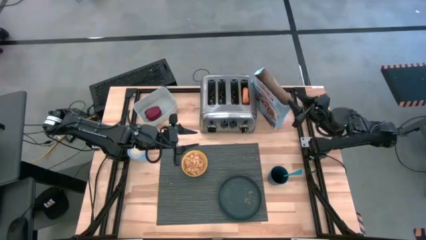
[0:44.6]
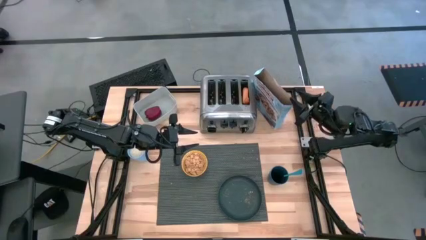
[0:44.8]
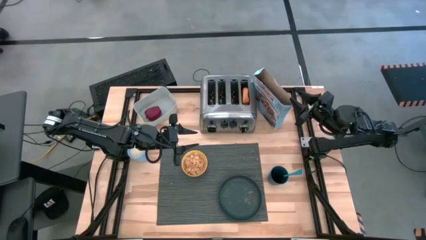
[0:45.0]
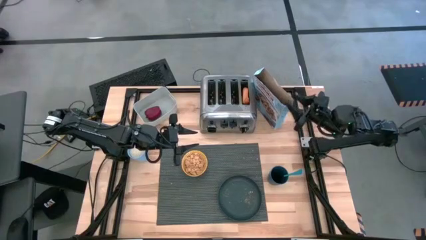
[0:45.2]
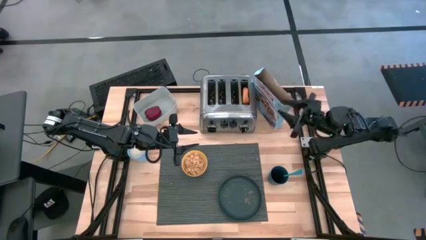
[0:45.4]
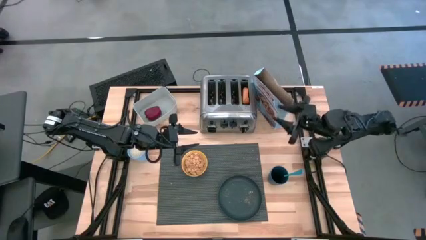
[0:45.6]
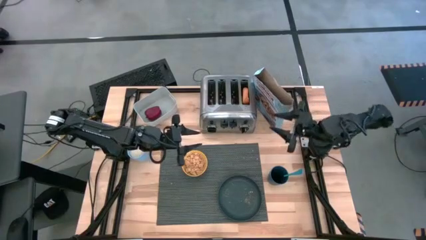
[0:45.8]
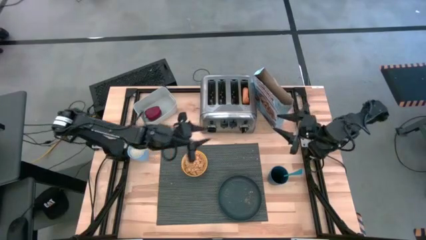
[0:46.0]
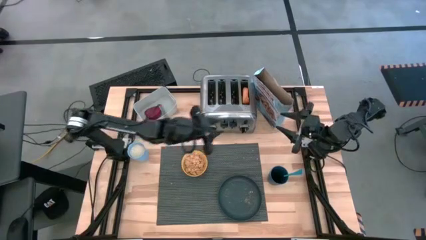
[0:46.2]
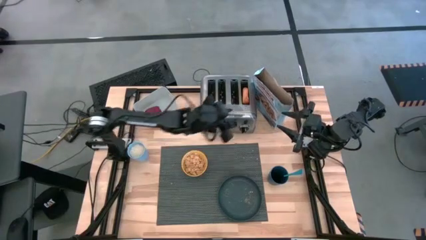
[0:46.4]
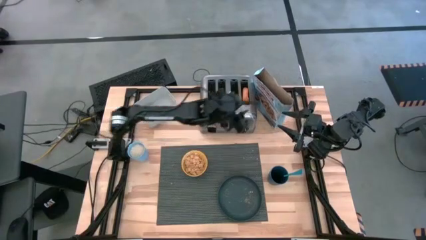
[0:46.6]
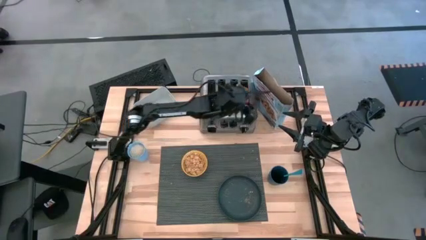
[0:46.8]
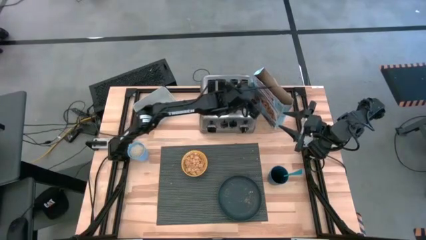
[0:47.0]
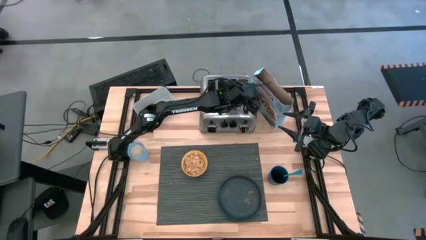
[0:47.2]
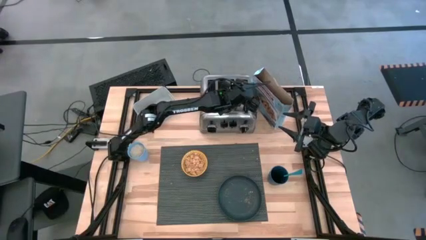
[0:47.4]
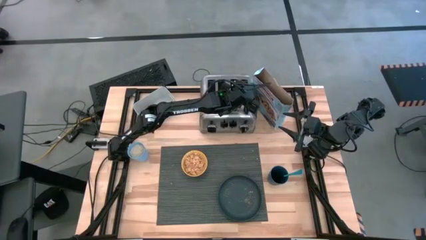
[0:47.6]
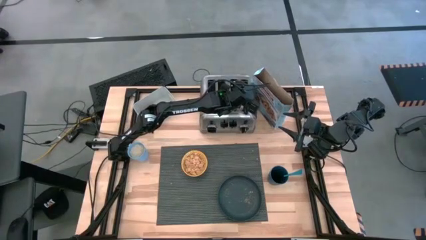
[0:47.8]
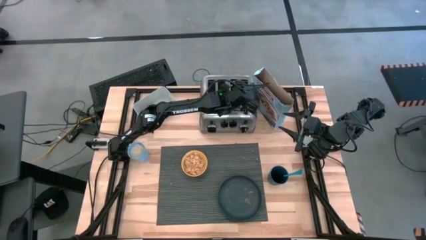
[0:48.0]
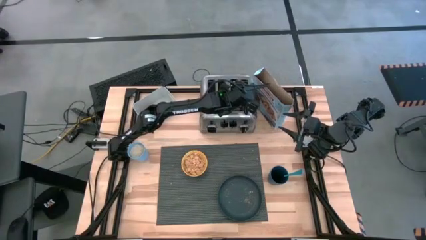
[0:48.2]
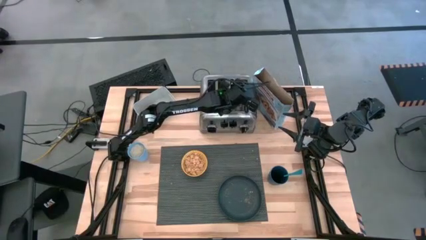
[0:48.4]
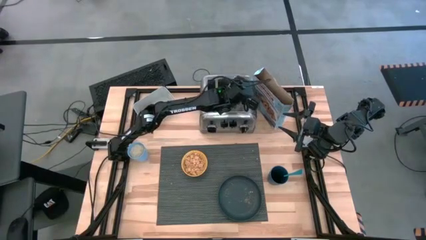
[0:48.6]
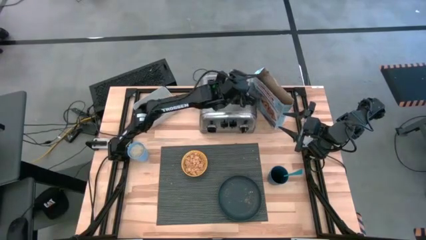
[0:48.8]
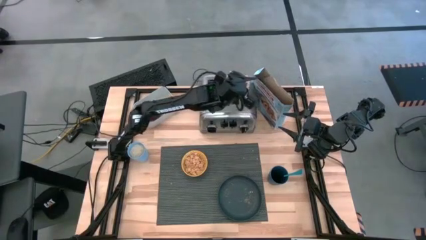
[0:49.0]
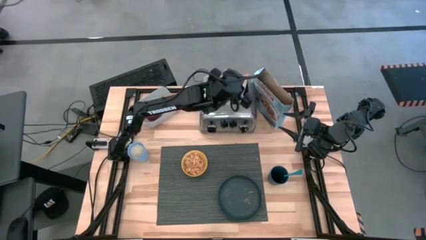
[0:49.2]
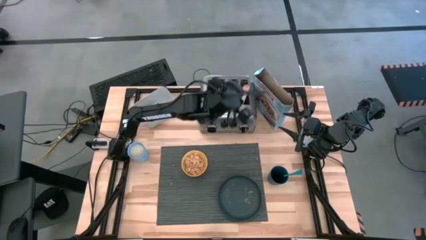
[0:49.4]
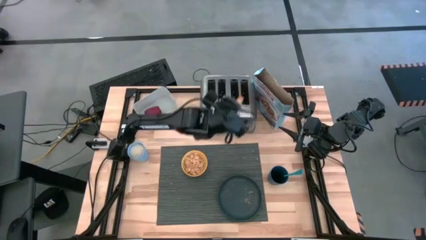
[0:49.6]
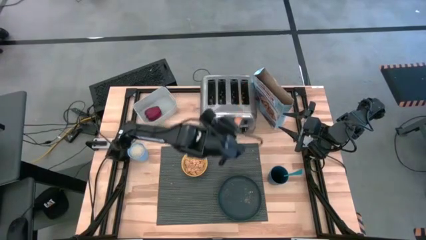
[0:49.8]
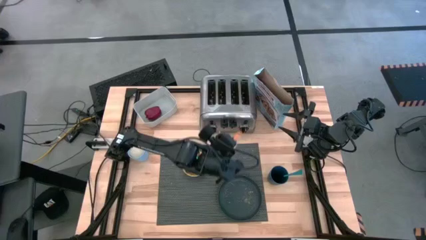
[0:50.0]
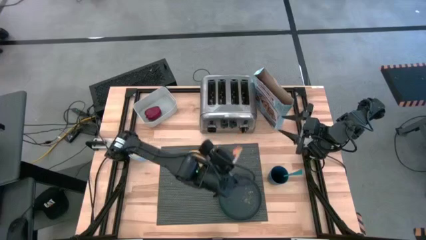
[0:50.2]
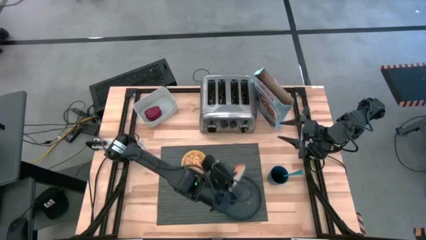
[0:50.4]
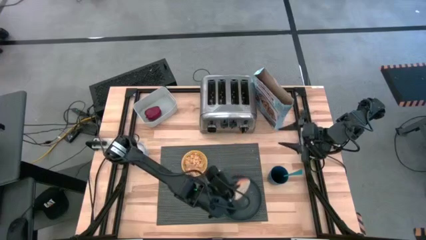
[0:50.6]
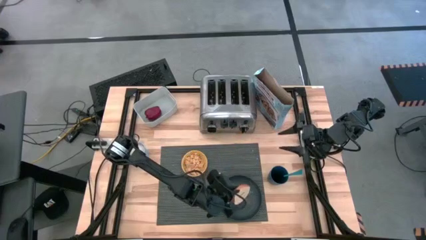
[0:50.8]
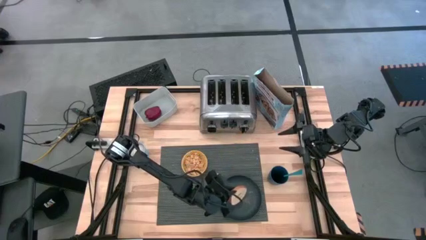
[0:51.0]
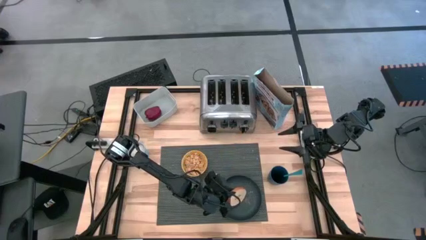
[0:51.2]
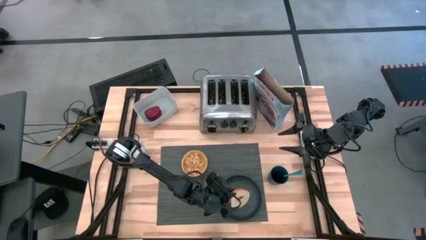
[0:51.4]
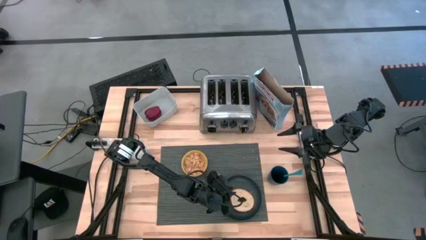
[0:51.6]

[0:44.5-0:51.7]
Task: Arrange a breakfast setting
Put the toasted bagel on the black plate

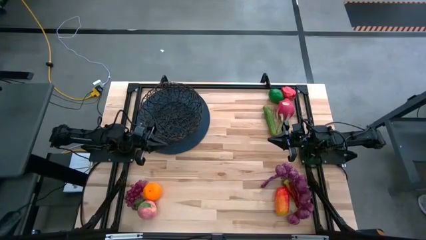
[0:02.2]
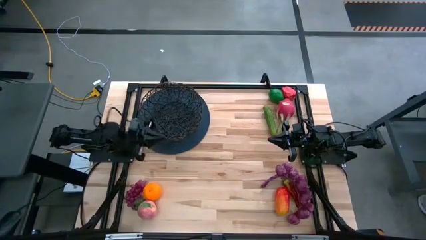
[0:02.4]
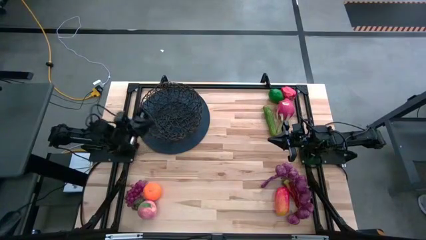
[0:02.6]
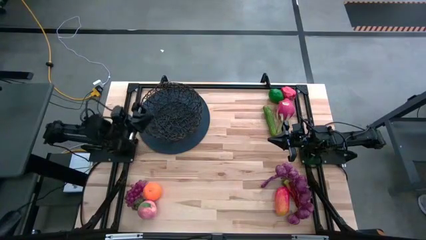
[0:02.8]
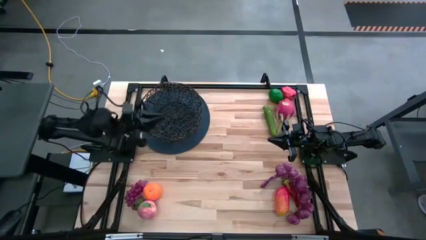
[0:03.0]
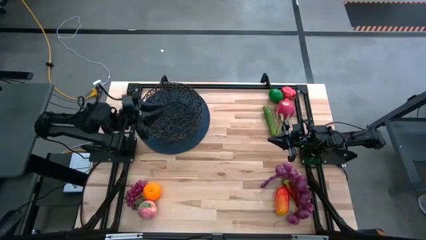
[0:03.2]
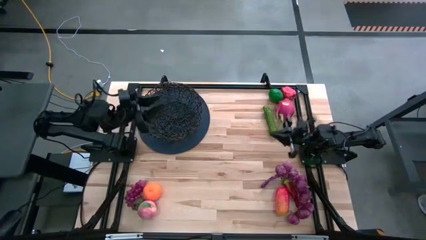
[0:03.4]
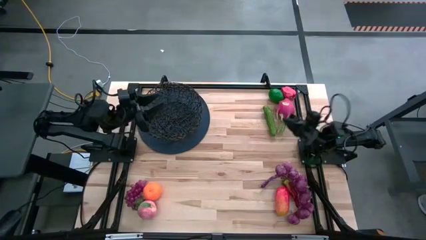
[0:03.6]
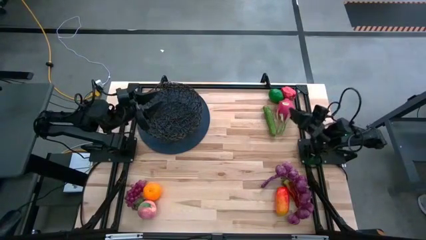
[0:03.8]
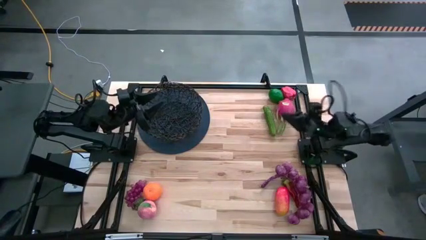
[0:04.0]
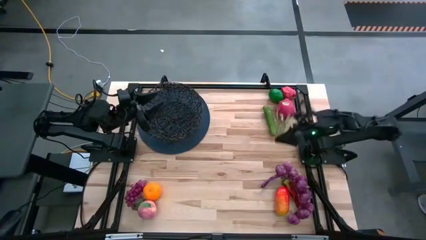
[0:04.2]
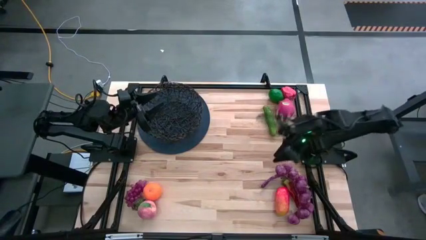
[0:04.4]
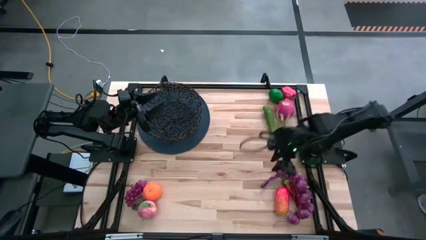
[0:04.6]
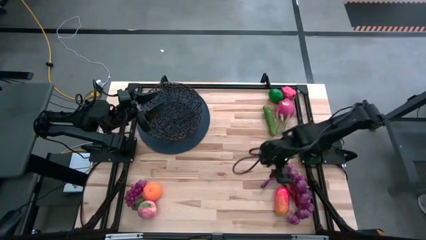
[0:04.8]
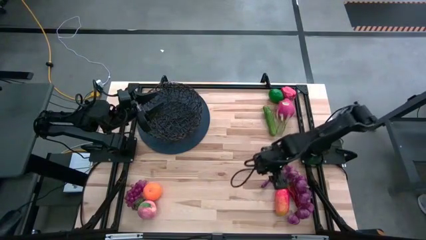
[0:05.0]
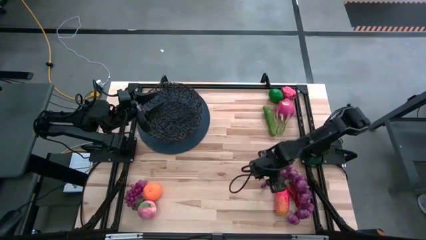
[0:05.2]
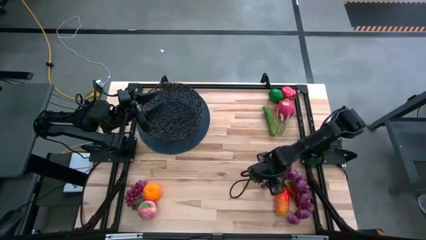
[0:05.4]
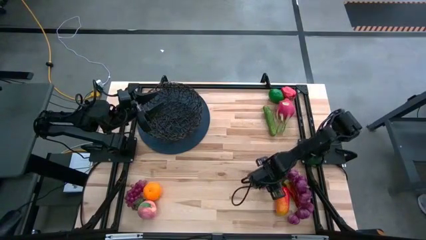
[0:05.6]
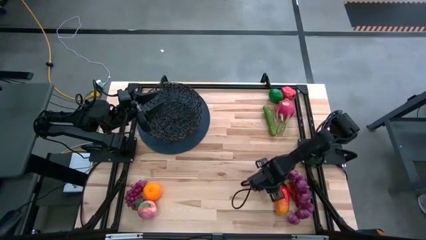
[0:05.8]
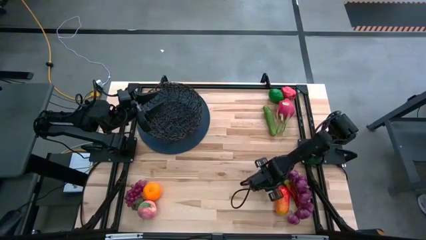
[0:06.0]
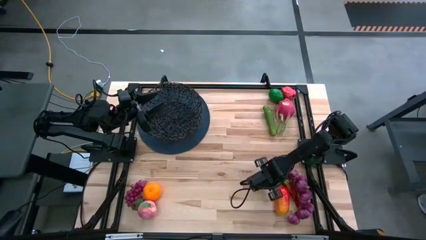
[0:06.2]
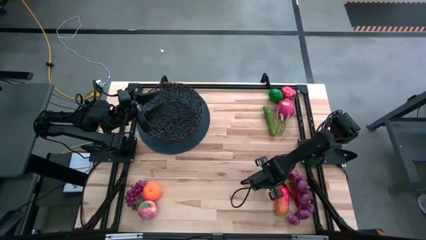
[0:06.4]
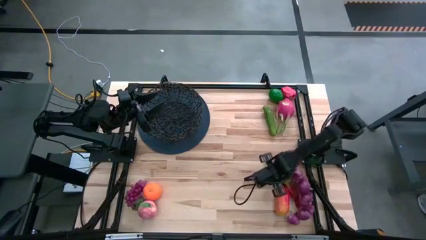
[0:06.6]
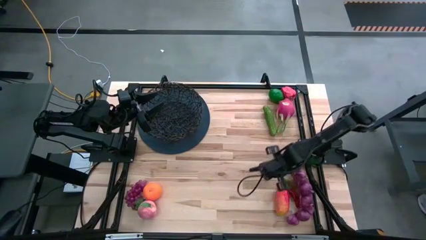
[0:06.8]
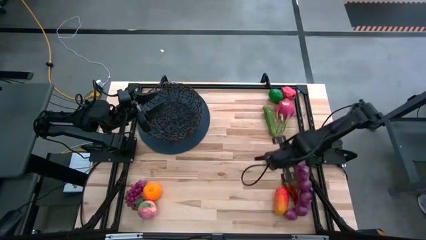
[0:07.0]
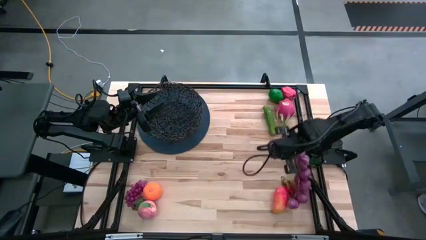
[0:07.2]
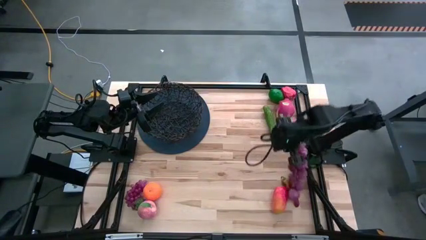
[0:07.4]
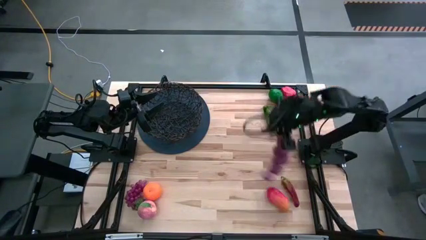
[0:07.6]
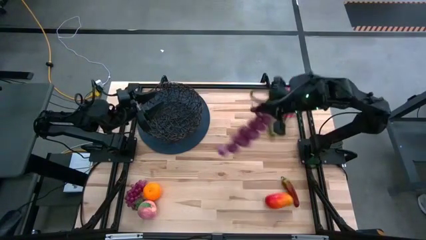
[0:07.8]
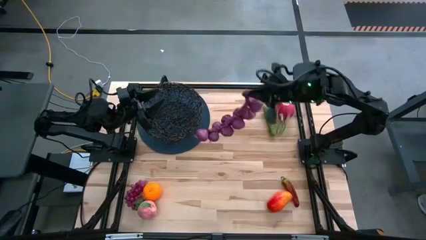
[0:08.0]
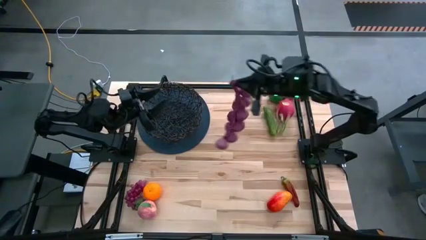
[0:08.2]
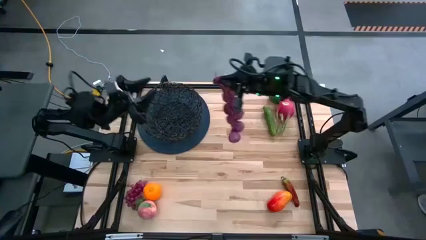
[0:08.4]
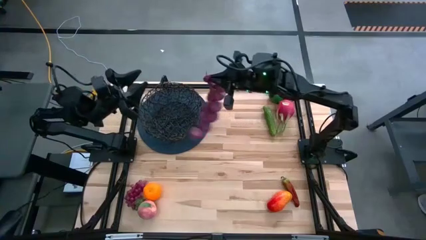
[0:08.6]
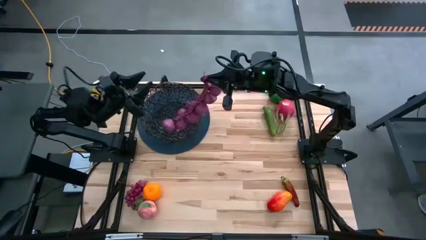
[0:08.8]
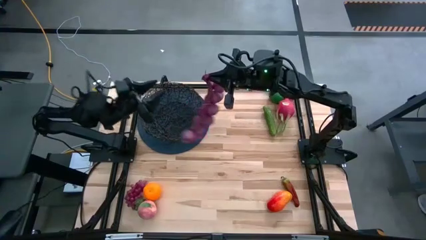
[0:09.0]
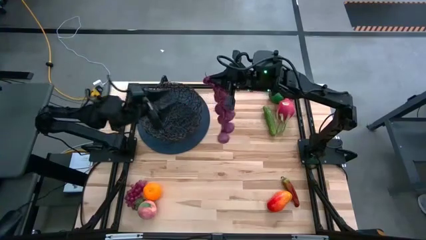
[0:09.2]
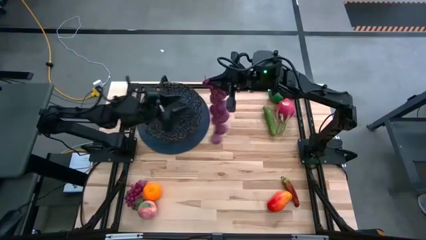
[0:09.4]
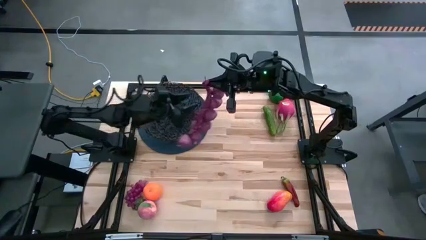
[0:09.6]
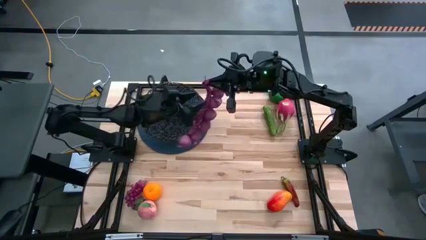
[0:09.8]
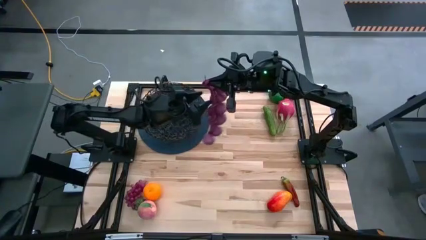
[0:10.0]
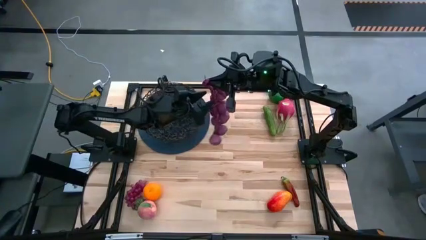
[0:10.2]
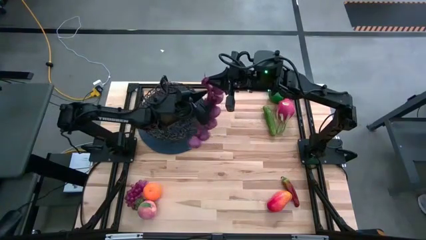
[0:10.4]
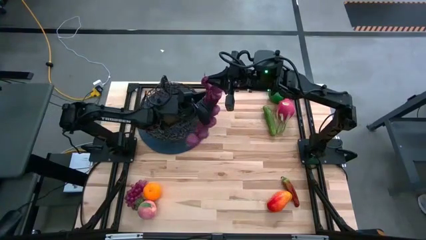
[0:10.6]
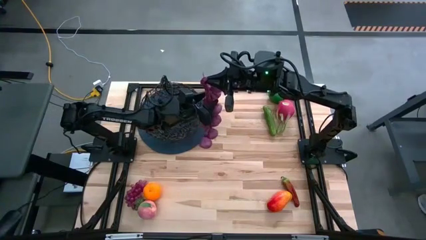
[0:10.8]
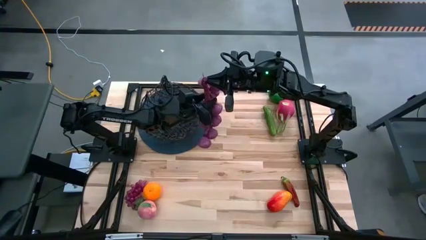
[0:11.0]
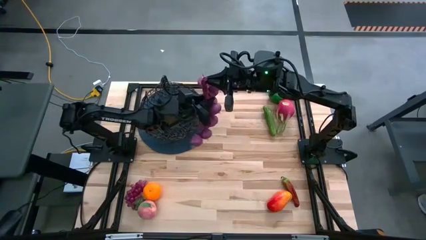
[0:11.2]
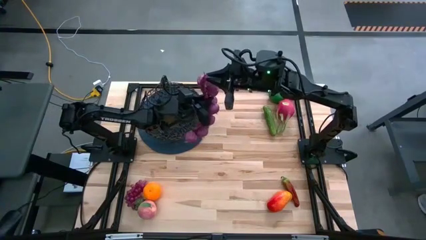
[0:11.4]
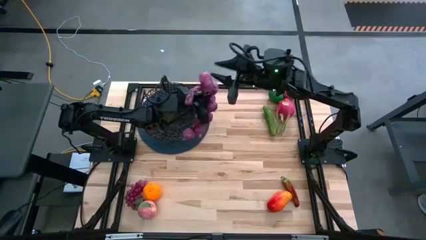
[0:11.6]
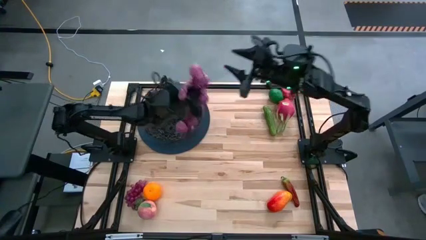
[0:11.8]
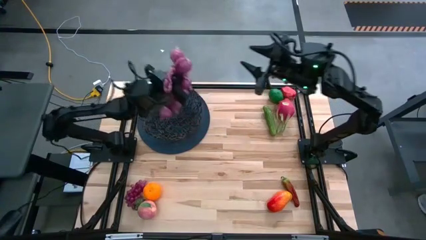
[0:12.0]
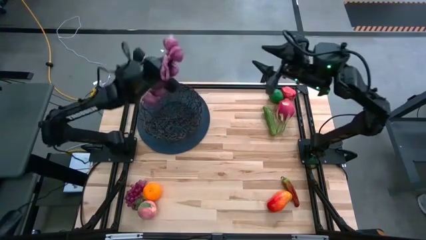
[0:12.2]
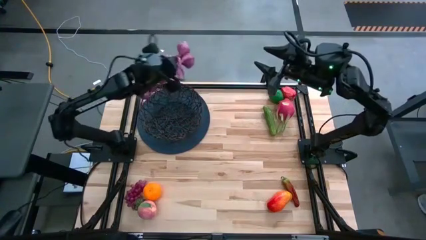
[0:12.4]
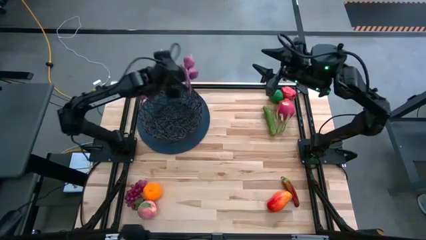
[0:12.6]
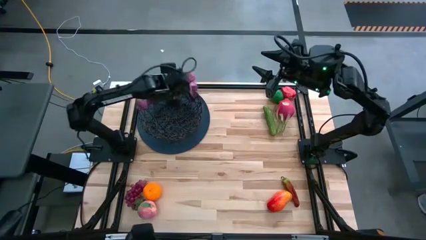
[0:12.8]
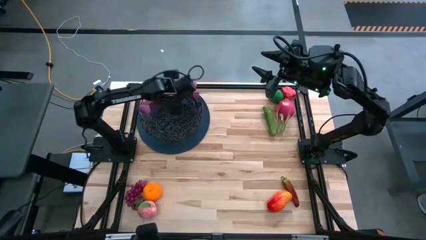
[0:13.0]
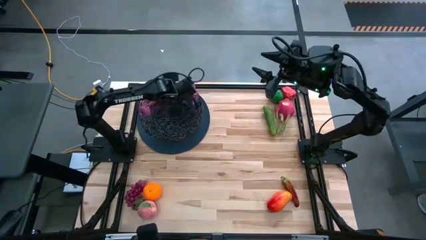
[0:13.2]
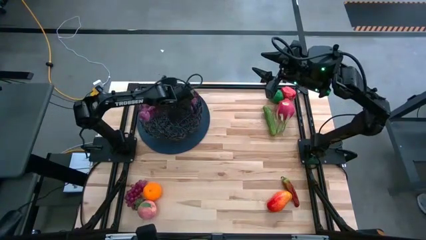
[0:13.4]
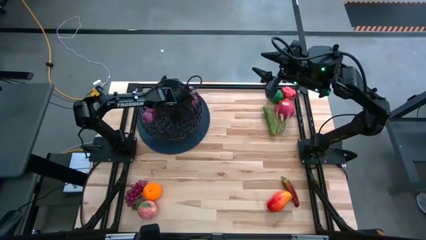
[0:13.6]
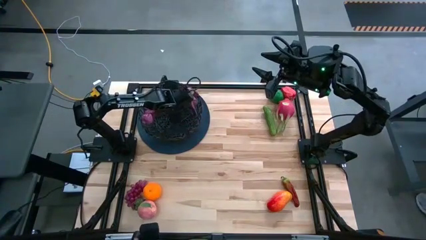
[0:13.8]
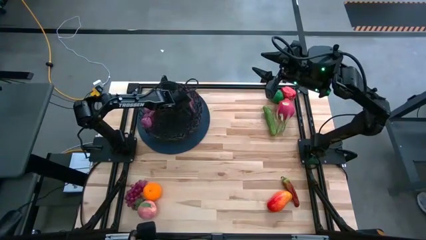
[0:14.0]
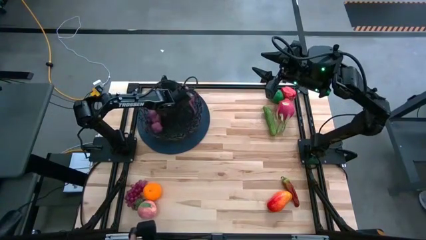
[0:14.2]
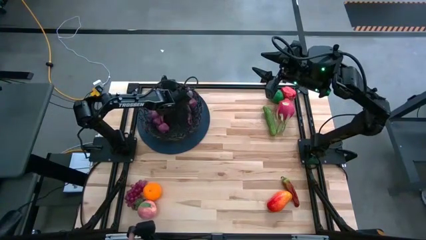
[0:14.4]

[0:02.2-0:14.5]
Task: Build produce basket
Put the violet onions into the black wire basket
